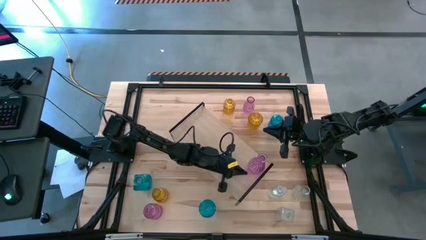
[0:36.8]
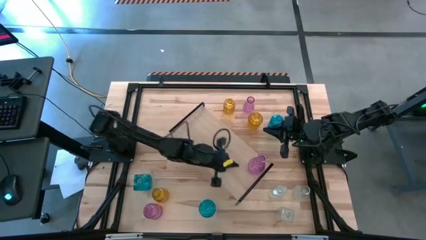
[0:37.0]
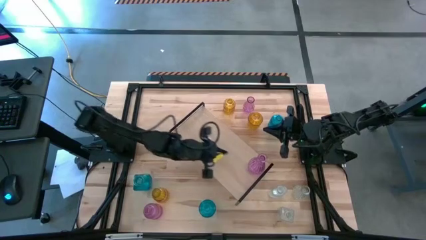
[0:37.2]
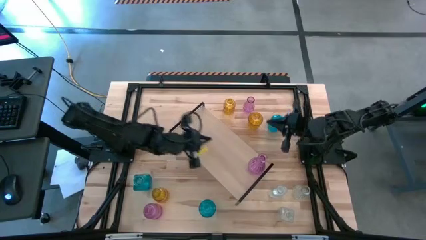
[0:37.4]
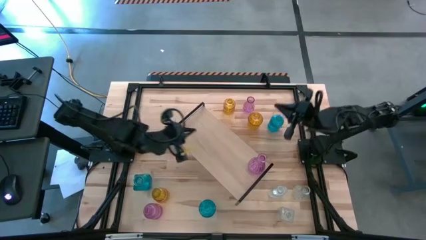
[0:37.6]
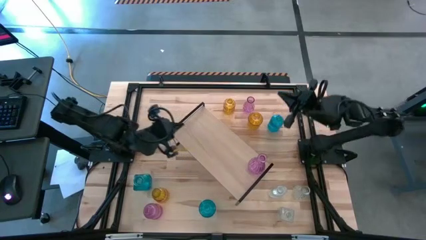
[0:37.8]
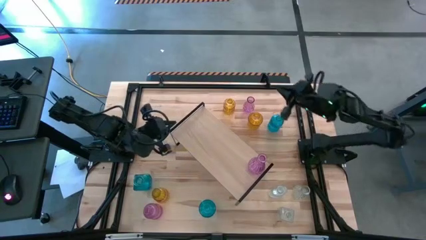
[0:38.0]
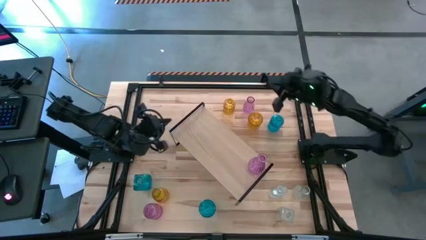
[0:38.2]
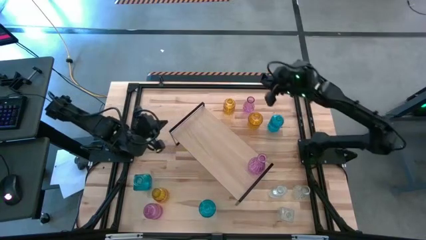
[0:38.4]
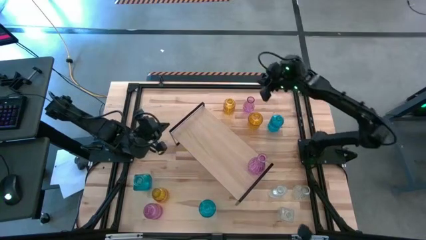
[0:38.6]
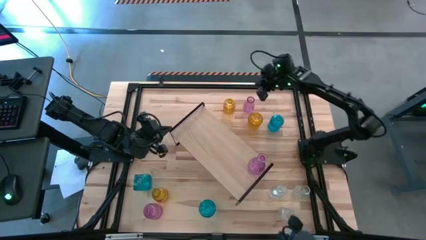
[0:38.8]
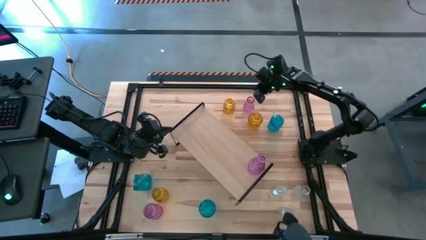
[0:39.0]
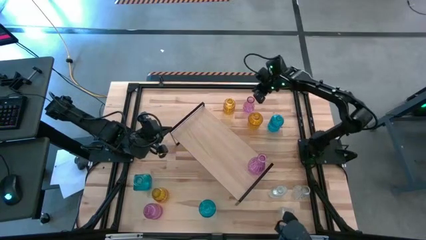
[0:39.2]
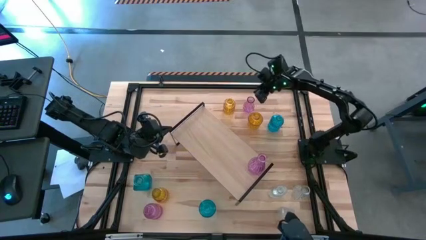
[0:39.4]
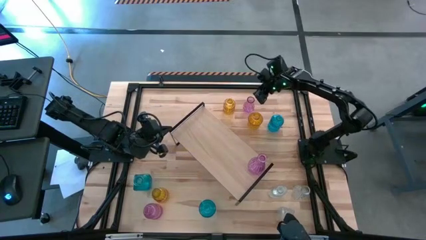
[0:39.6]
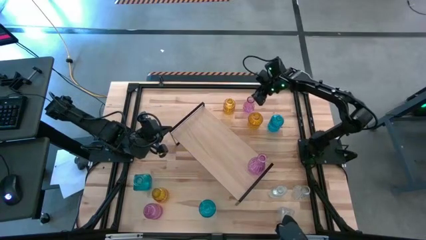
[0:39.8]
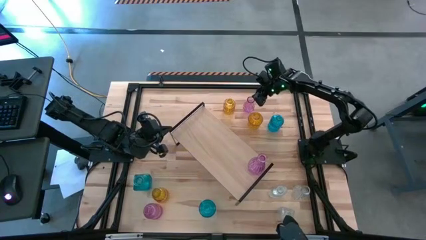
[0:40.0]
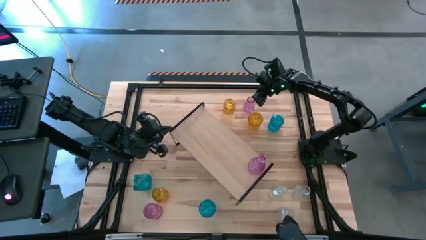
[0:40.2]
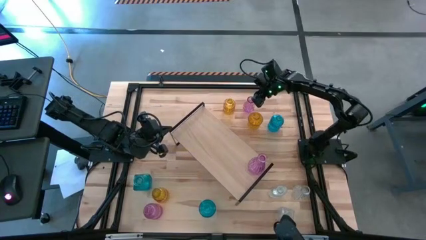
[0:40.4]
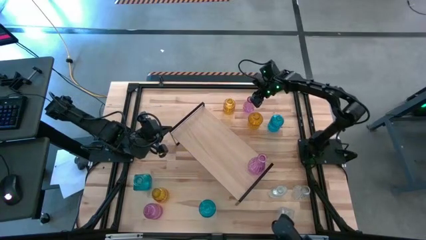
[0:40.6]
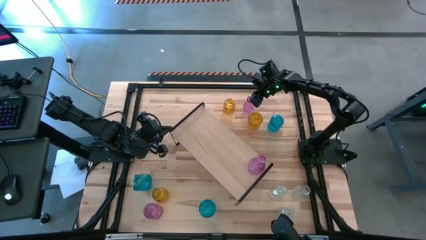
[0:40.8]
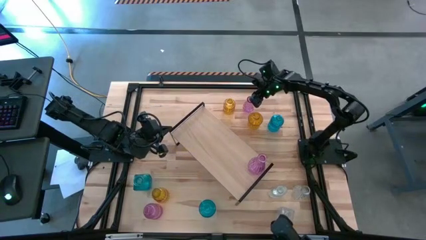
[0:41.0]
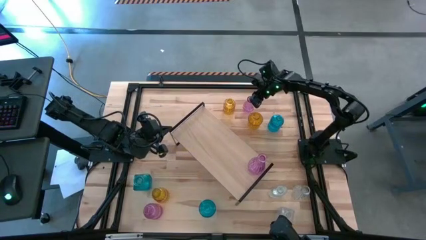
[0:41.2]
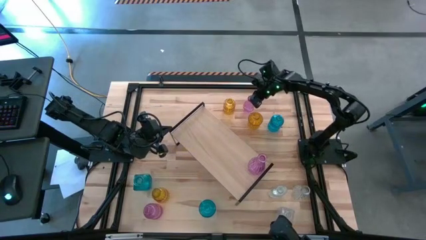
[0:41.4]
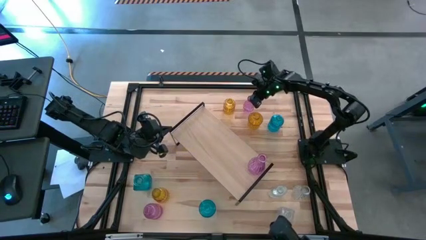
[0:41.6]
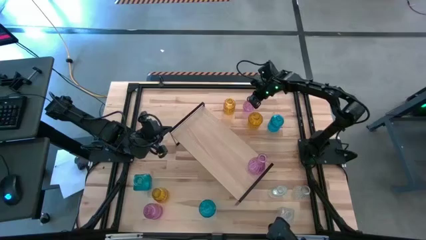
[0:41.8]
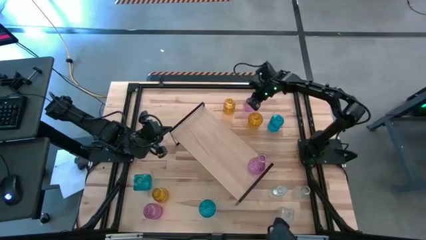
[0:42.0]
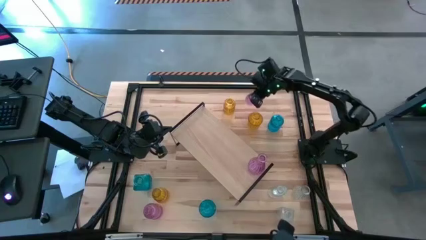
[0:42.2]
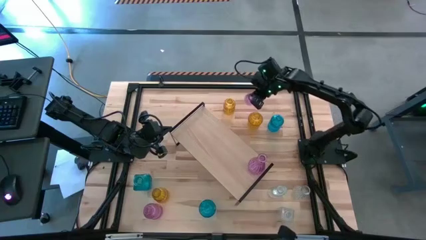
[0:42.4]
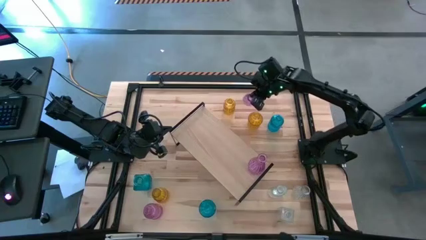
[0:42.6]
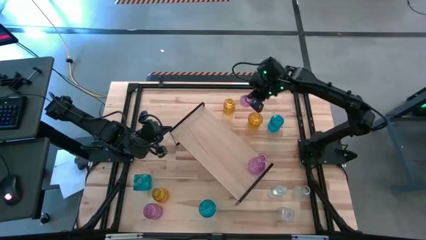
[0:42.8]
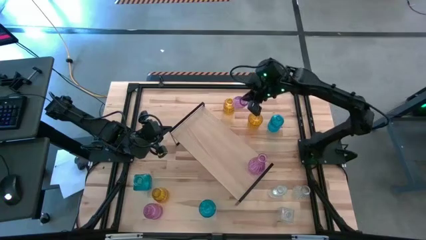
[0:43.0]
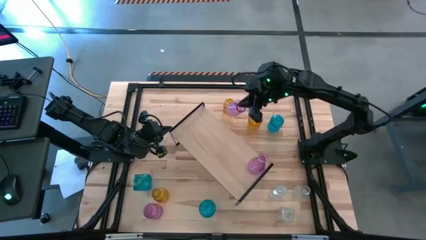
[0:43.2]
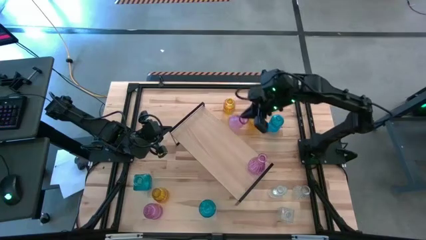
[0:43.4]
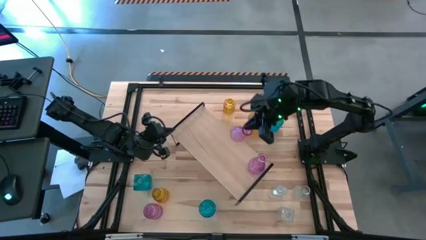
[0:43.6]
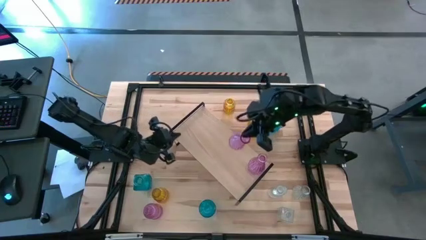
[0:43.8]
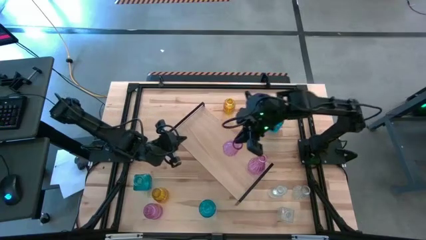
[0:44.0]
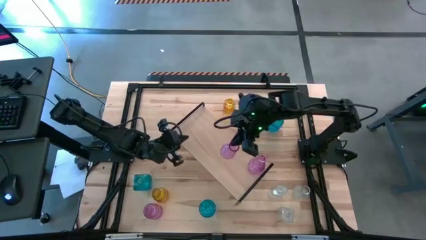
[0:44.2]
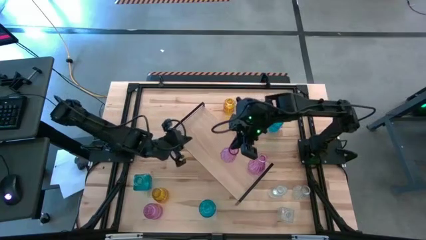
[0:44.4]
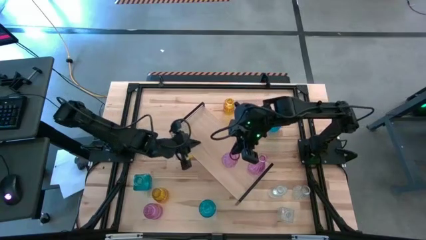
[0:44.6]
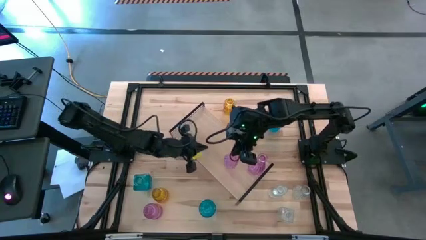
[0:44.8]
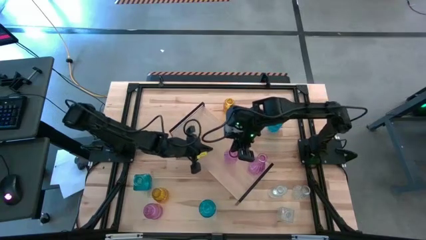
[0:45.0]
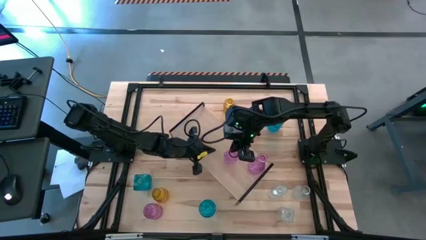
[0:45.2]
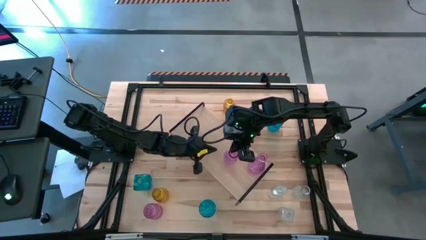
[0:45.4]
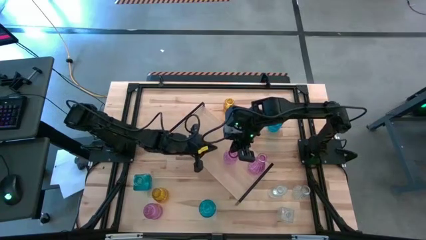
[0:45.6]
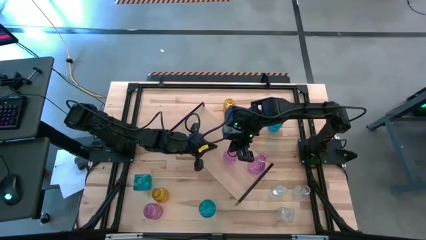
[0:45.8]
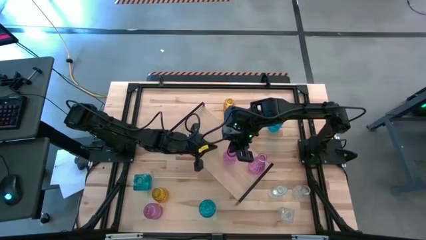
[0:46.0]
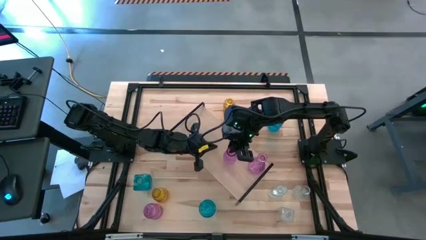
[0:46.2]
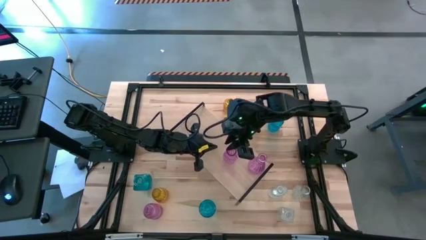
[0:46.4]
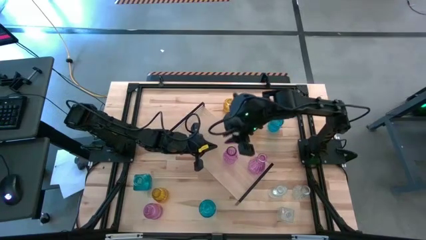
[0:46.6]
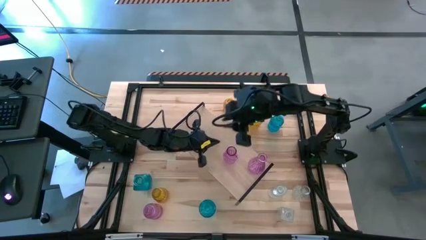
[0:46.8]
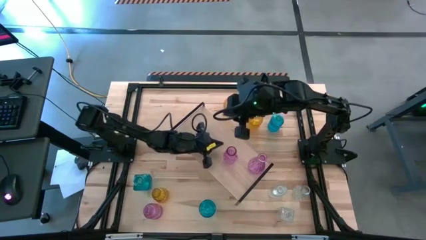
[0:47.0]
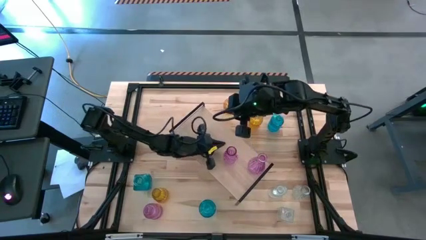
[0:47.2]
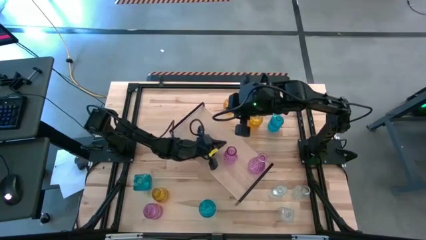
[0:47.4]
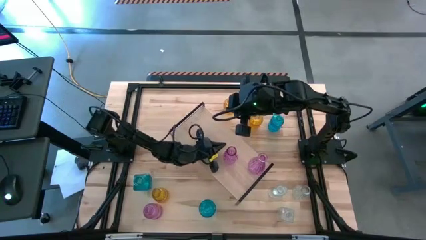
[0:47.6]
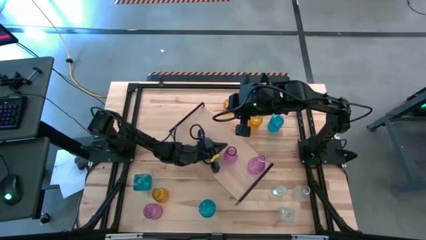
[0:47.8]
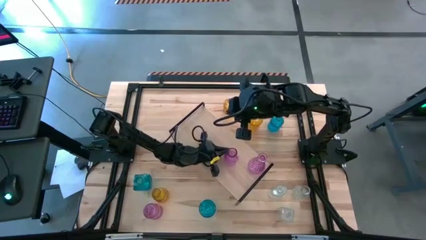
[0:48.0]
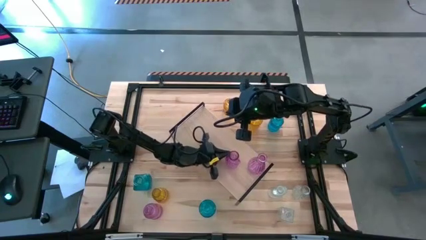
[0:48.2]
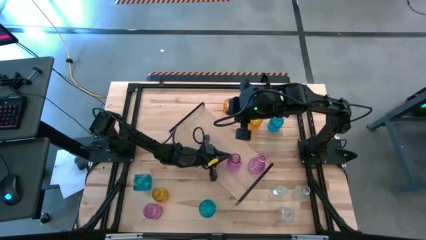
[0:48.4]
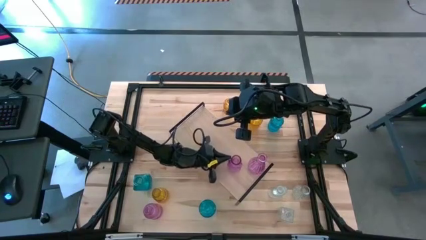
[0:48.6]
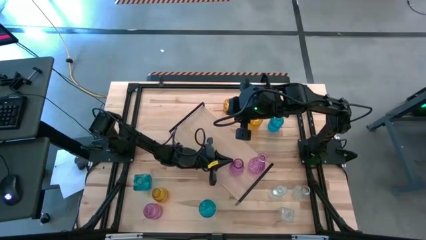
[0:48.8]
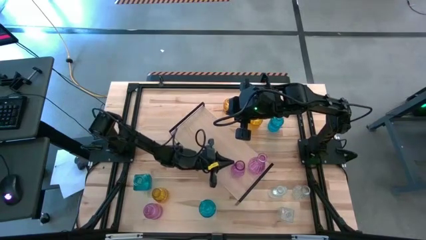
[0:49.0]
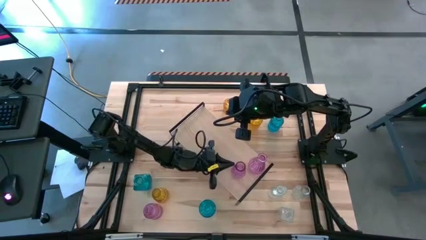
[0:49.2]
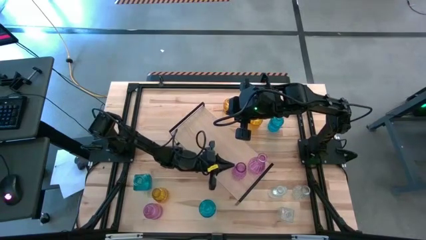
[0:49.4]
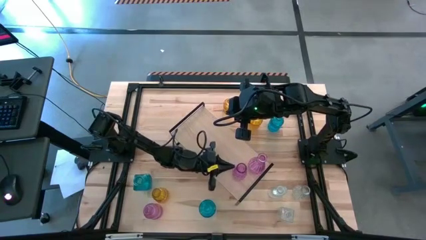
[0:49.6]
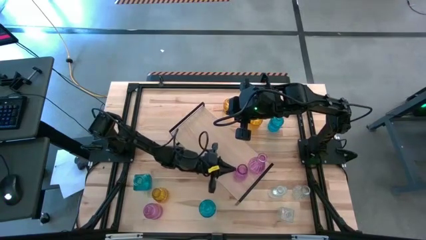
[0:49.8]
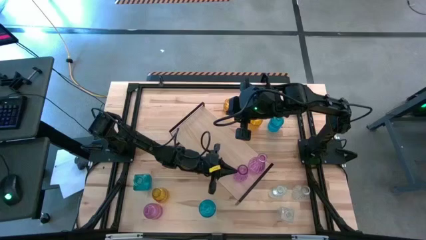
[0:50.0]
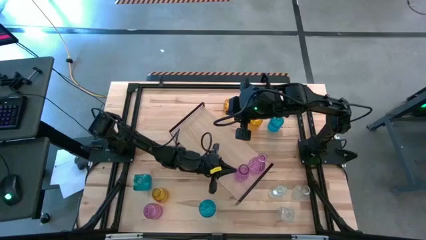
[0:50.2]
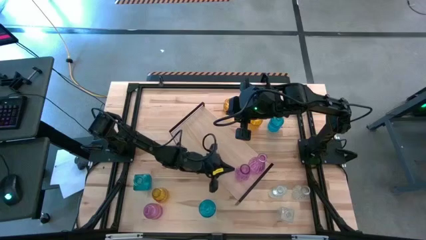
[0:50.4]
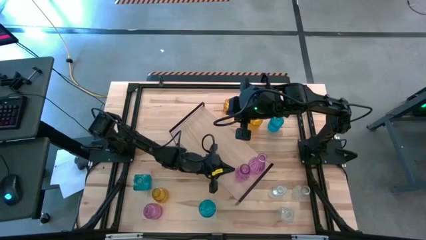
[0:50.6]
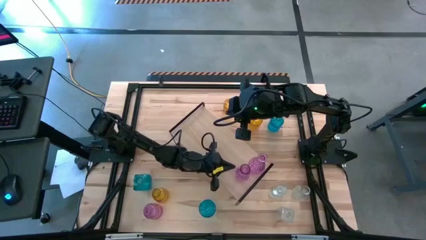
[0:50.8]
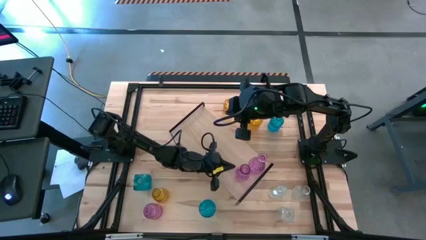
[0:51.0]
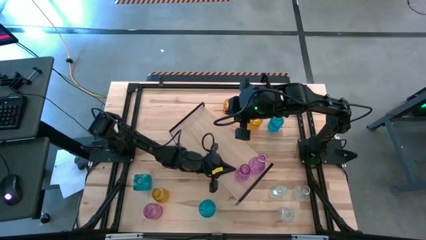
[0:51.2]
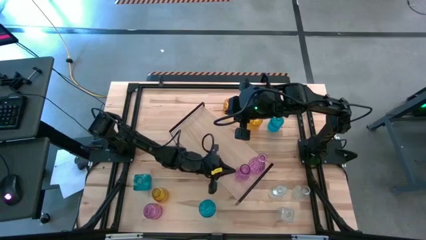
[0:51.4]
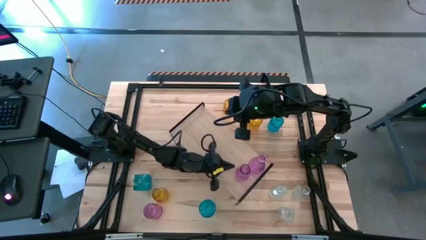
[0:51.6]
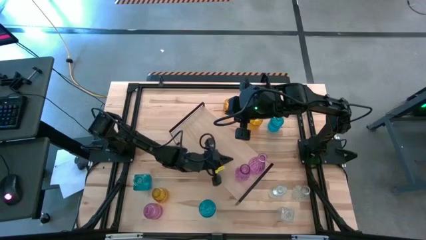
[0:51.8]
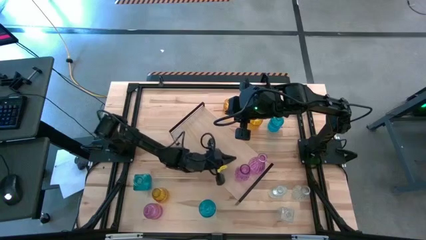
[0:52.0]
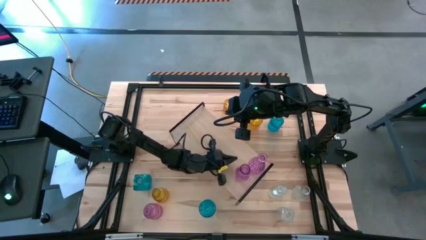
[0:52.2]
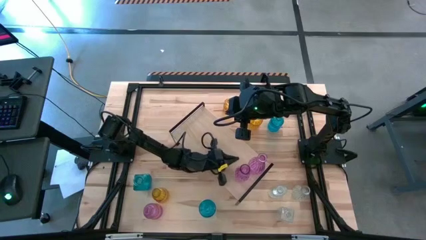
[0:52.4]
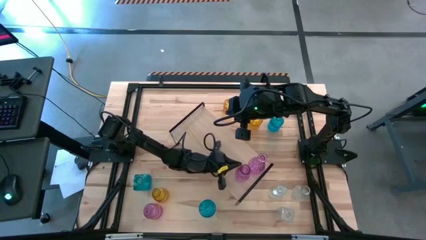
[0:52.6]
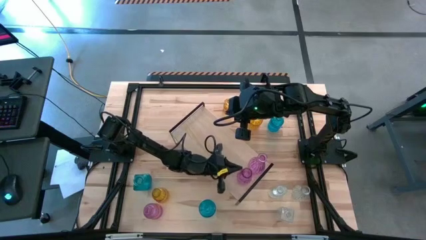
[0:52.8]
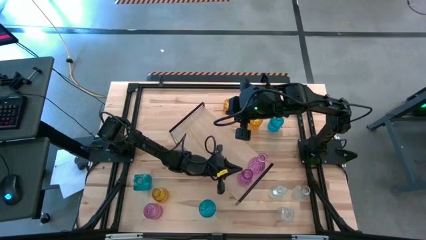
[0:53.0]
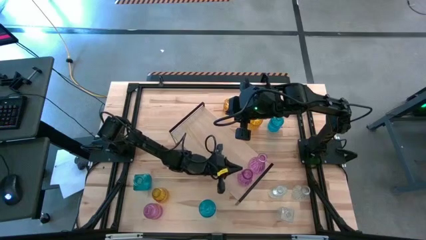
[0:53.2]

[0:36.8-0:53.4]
Task: sort vases onto shelf
Put the top pink flower vase on the shelf aligned with the other pink flower vase
